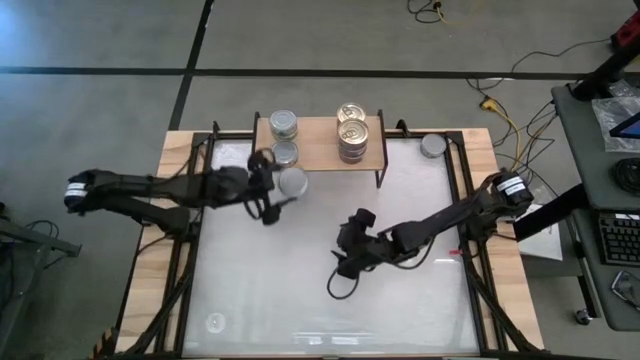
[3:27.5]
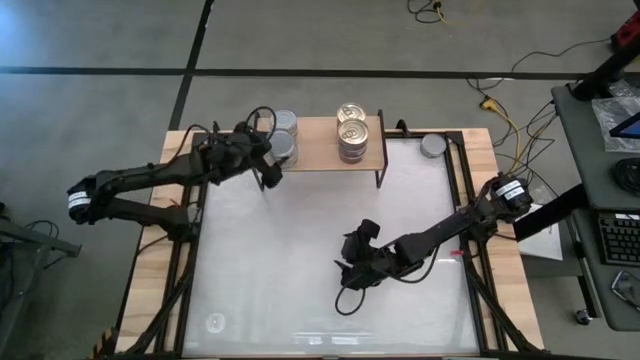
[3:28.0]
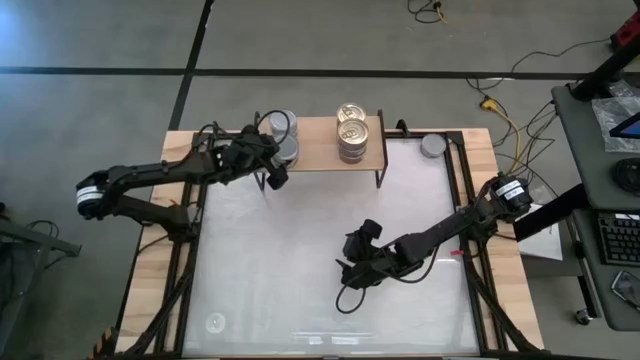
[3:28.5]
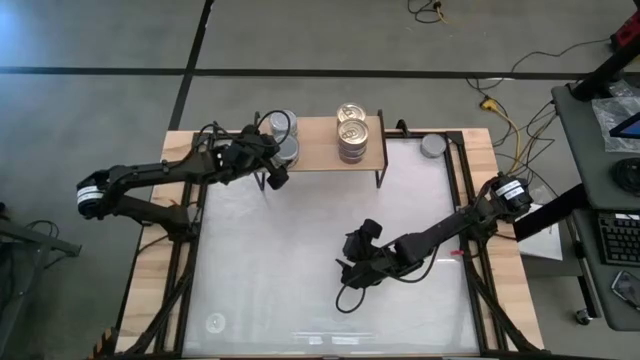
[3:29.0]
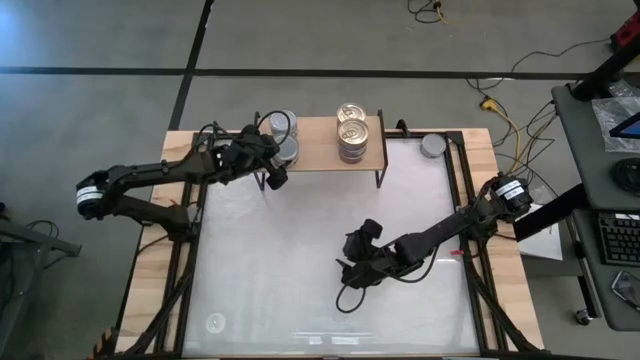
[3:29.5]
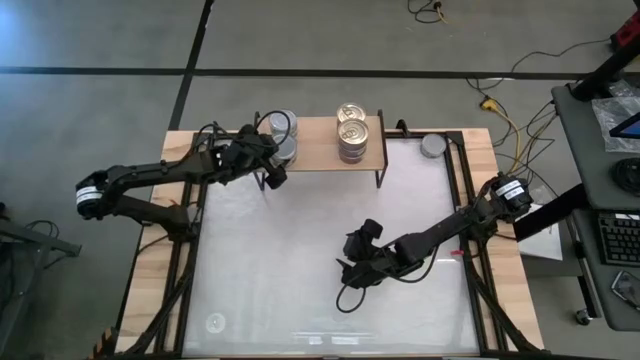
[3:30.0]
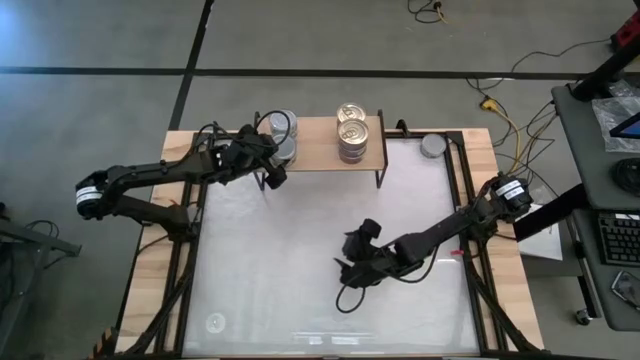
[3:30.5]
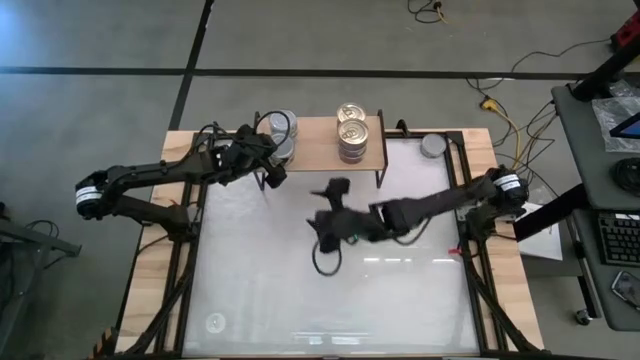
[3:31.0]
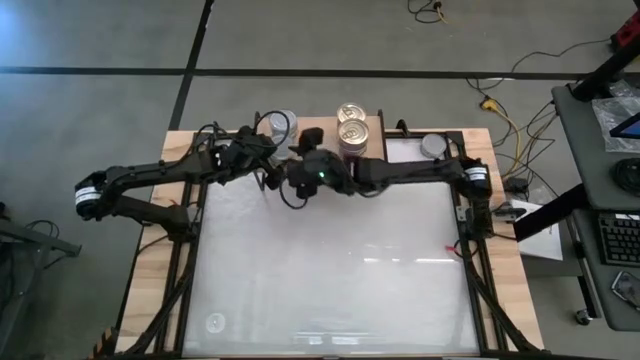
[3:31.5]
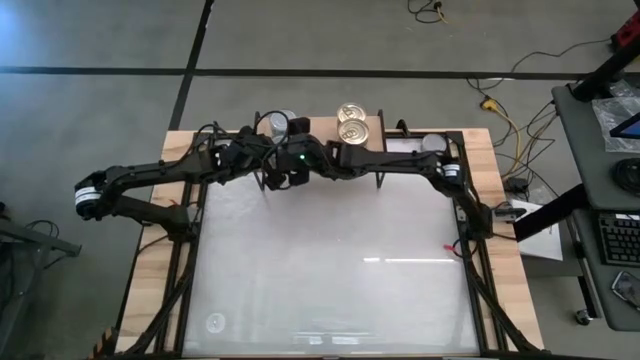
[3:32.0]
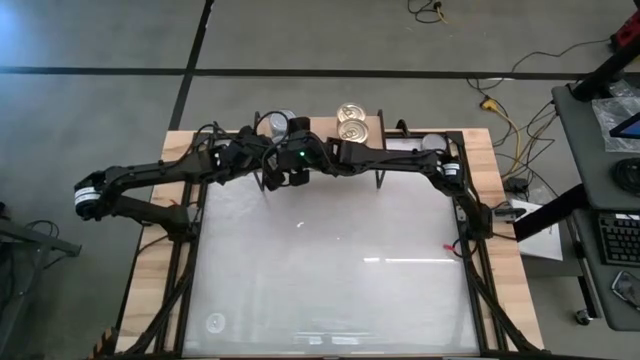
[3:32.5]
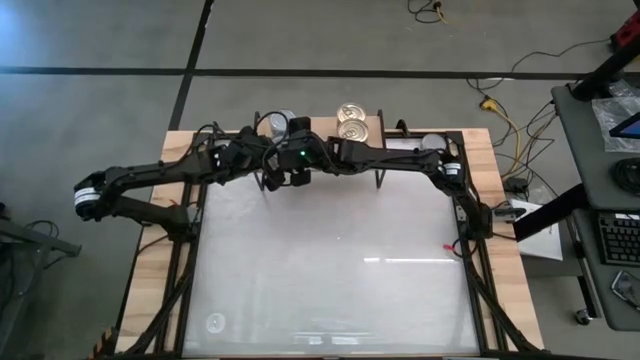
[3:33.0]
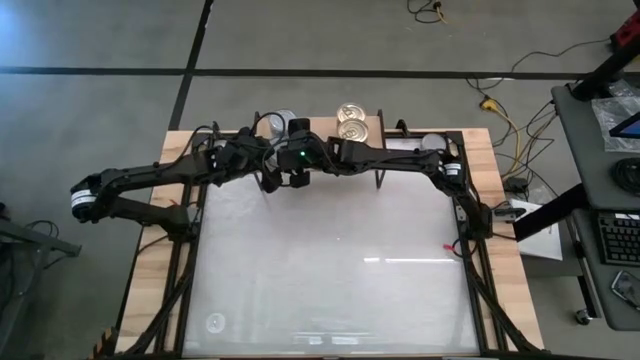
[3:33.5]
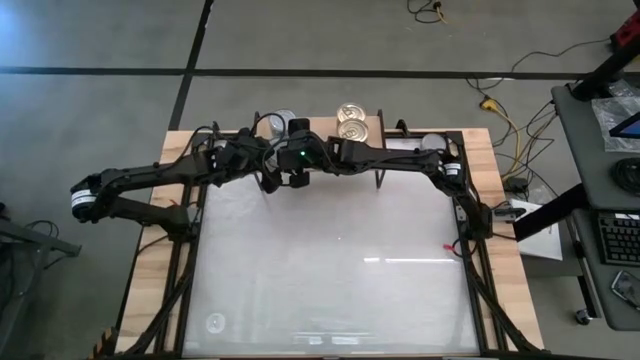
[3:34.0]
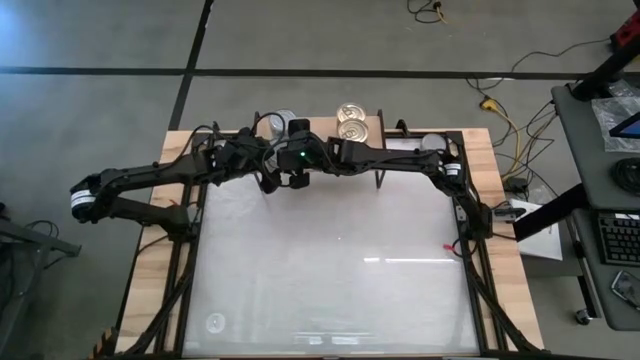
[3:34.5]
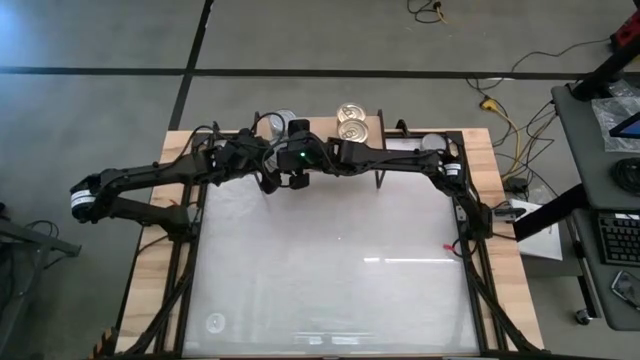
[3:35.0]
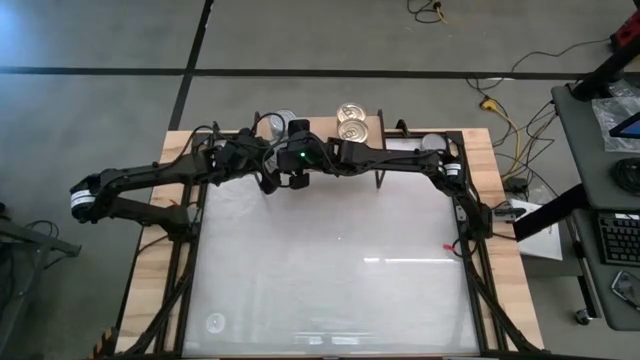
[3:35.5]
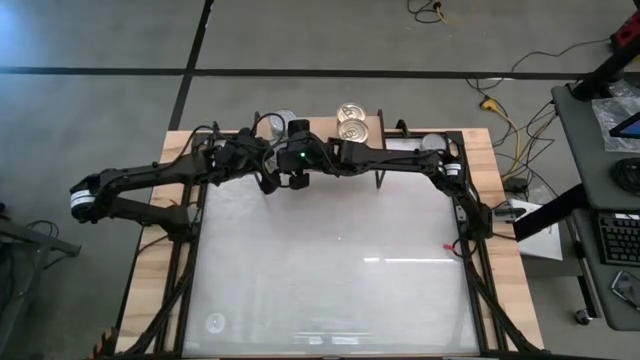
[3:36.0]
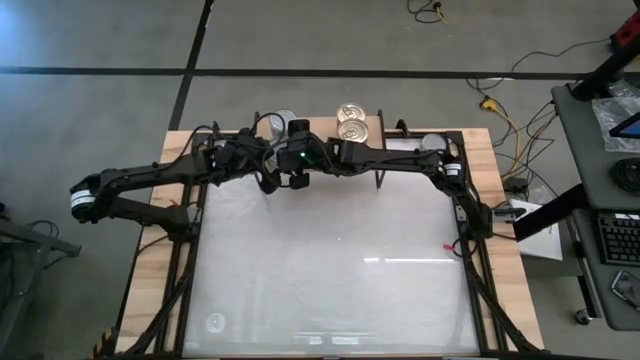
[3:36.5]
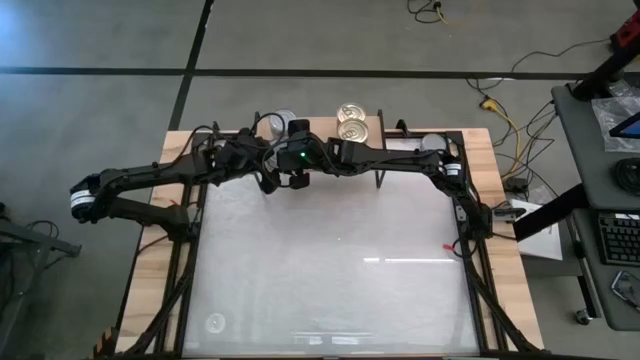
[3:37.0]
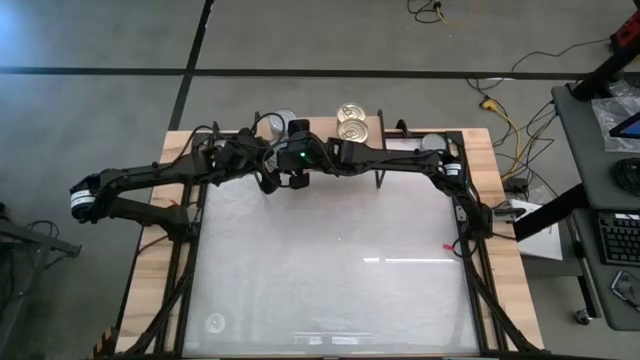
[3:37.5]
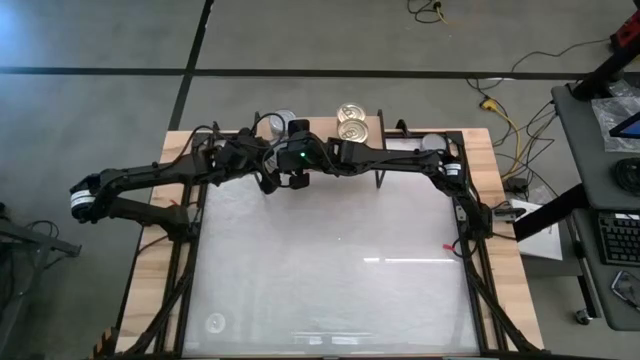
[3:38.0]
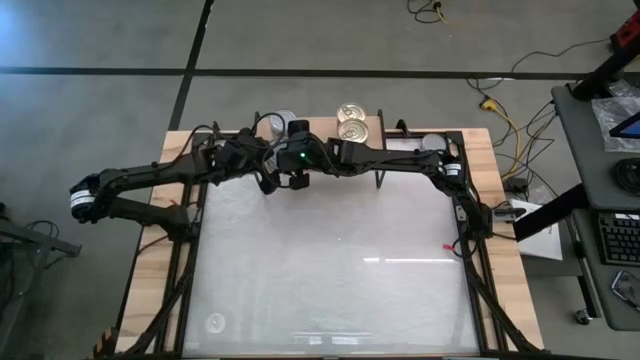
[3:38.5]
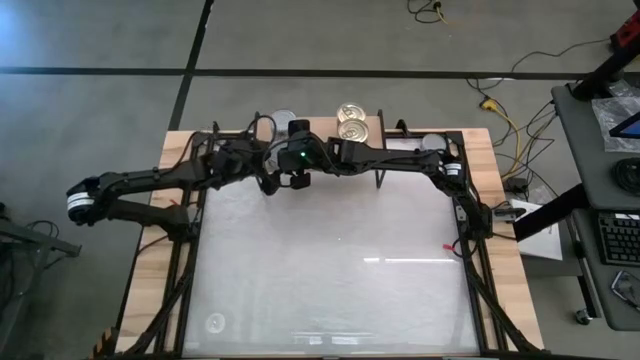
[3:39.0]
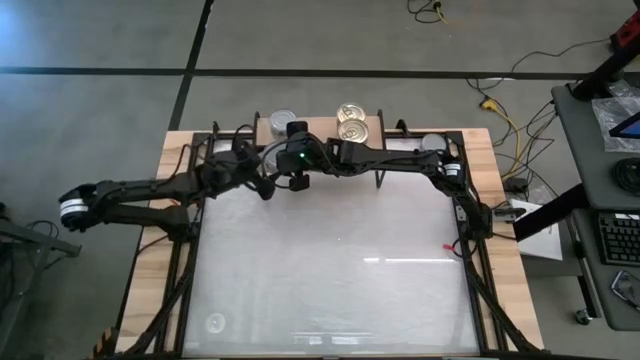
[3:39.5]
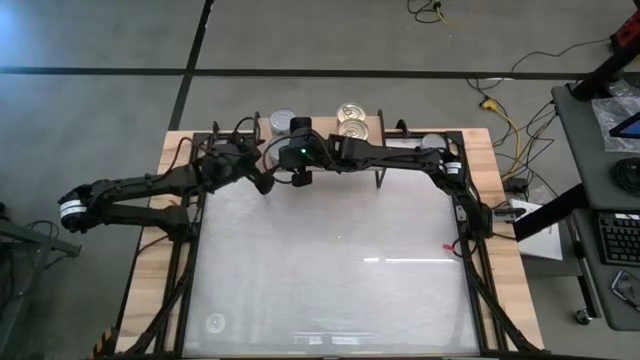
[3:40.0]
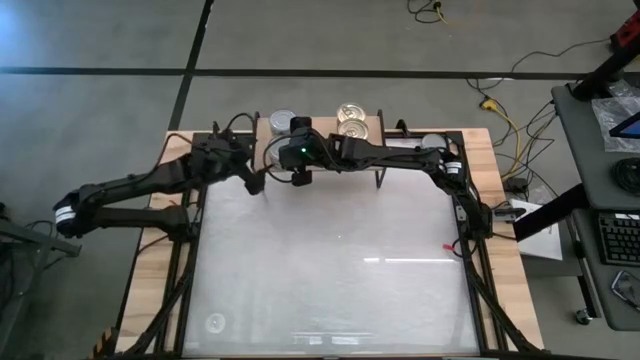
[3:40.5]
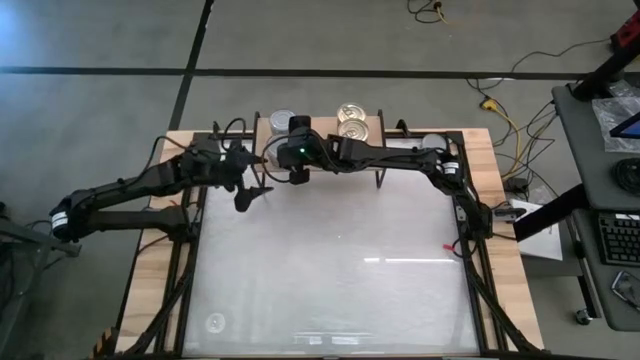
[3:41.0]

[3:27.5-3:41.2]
Task: Stack canned seafood by type on shelf
Stack the green tuna can on top of the other green tuna can on the shelf

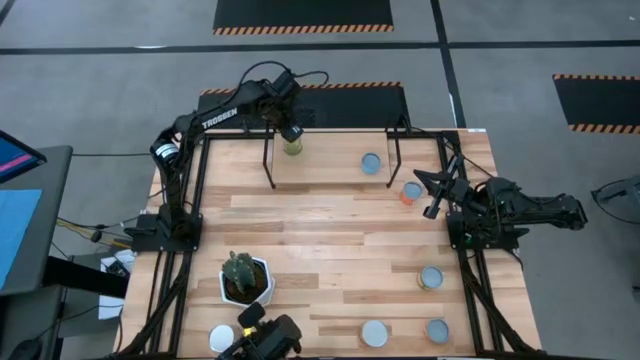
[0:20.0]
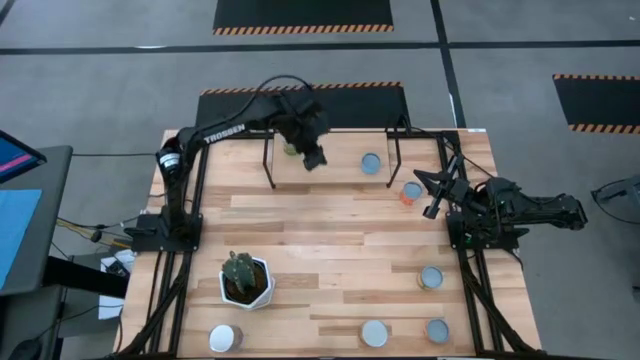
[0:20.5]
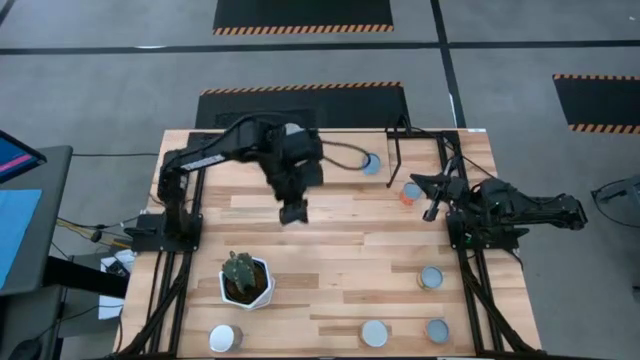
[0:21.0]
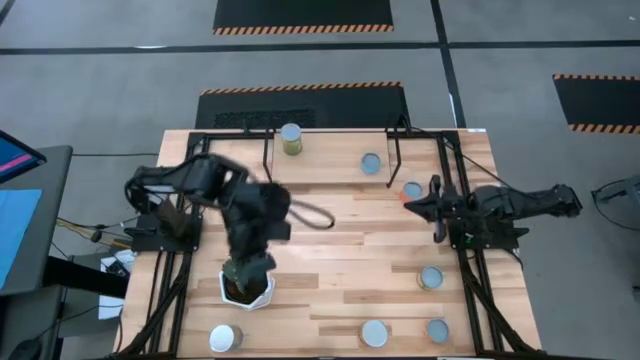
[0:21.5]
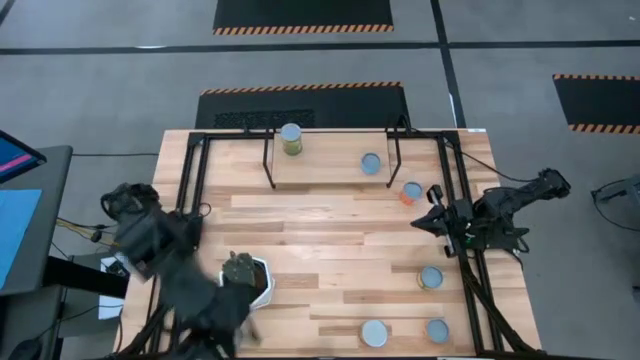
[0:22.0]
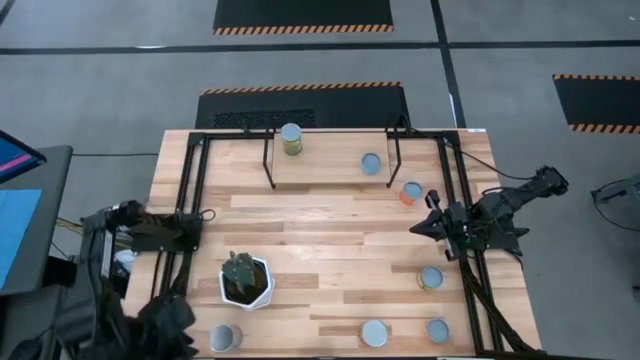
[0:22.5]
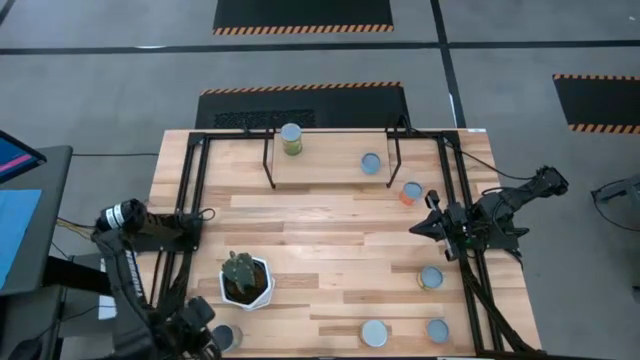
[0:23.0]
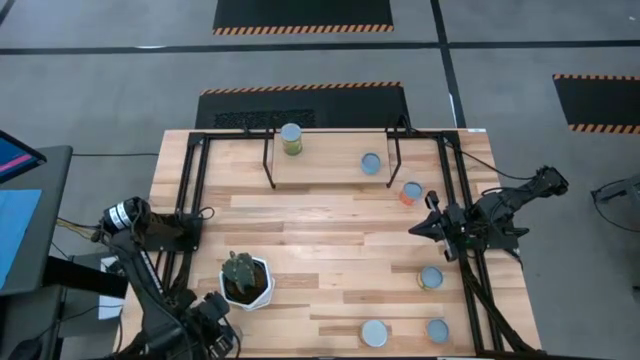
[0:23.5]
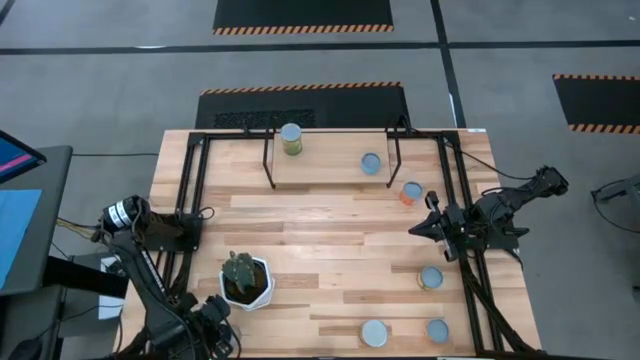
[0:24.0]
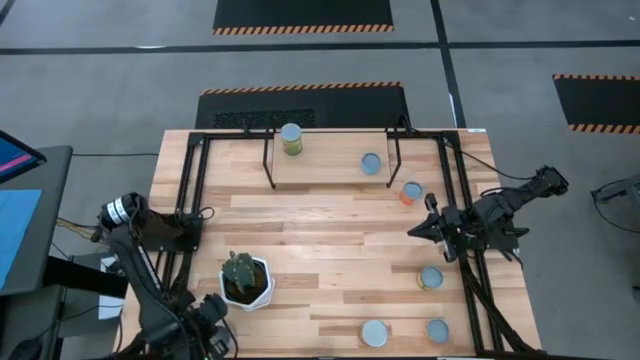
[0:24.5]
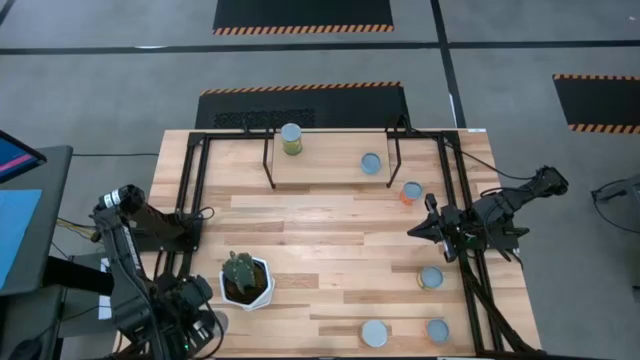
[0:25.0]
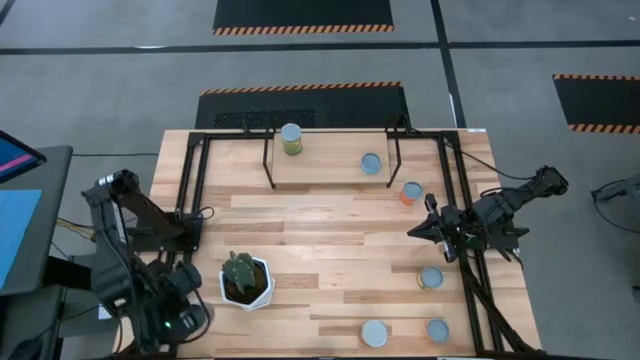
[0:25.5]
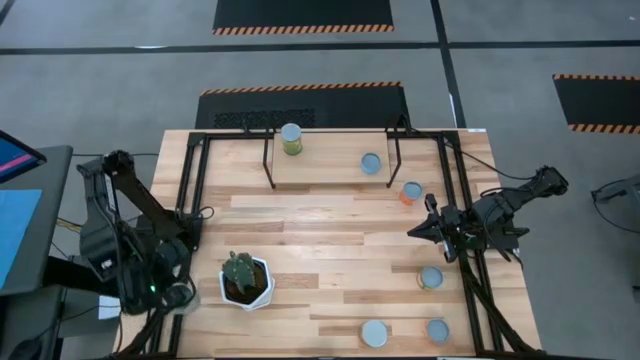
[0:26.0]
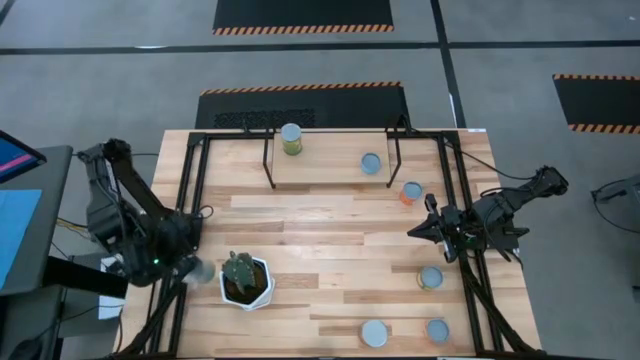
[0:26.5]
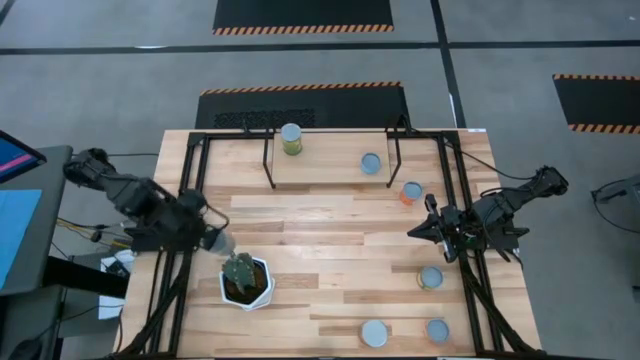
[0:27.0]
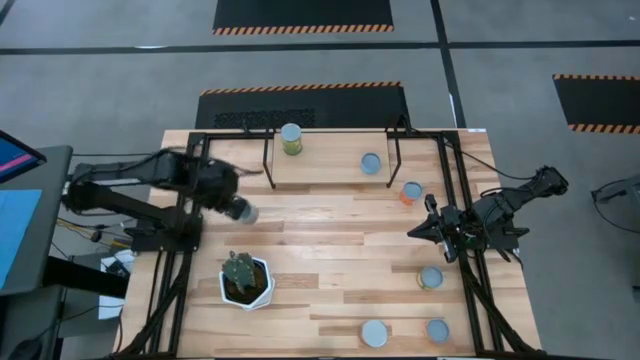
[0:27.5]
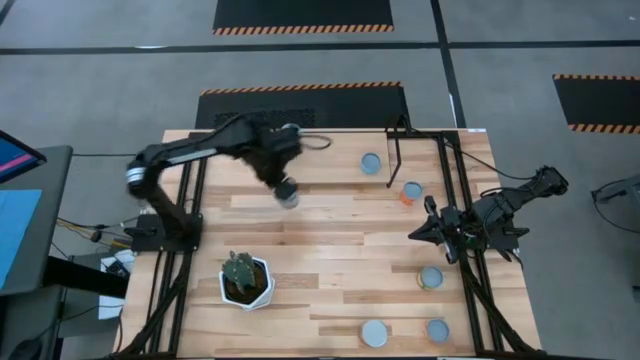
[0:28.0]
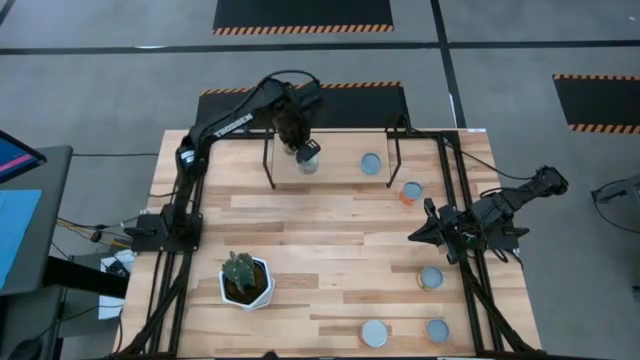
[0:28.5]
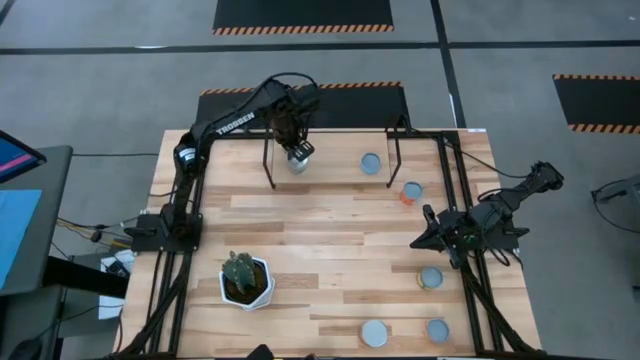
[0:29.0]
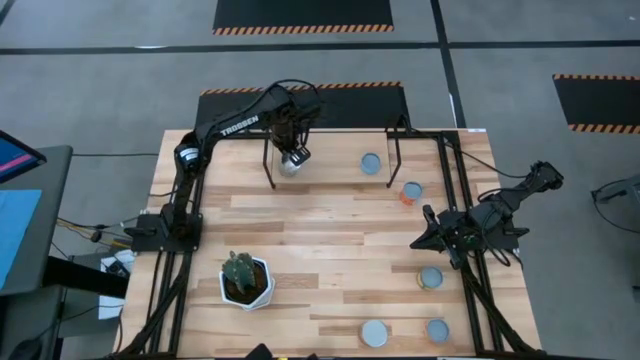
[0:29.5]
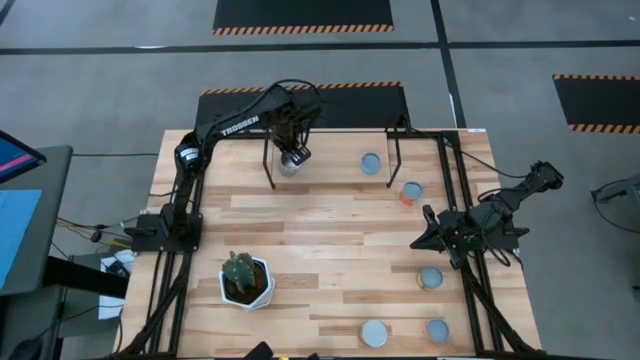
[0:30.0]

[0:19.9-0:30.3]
Task: Pick and place cans onto a shelf
Put the canned tomatoes on the shelf
